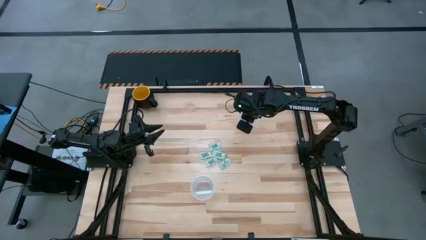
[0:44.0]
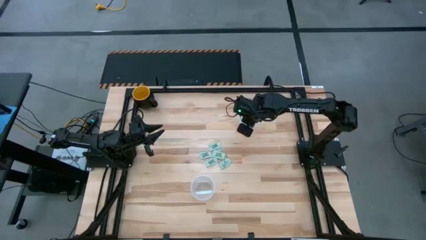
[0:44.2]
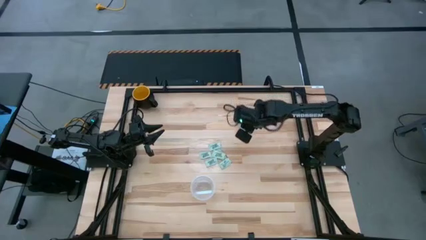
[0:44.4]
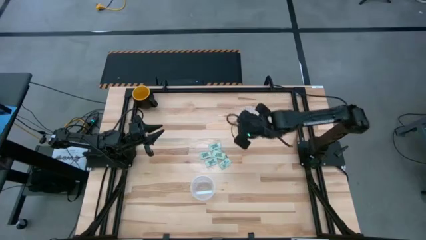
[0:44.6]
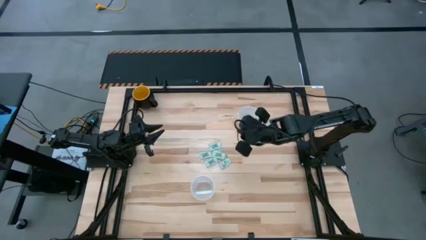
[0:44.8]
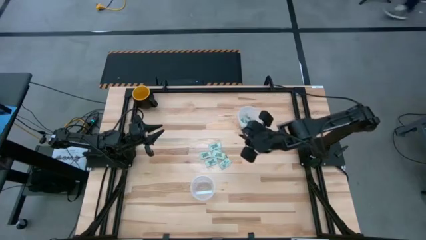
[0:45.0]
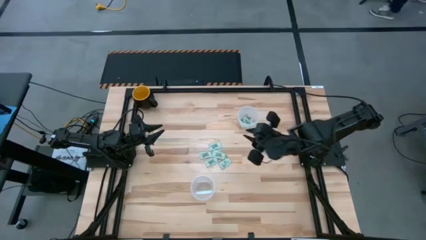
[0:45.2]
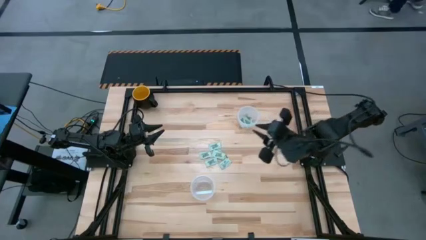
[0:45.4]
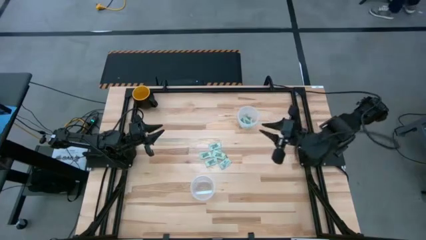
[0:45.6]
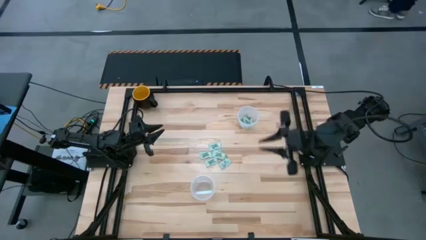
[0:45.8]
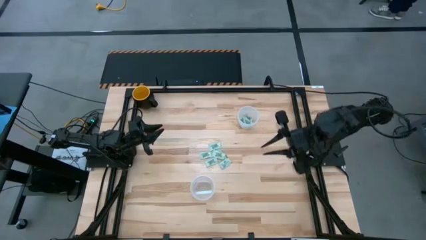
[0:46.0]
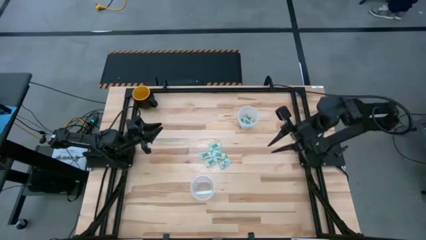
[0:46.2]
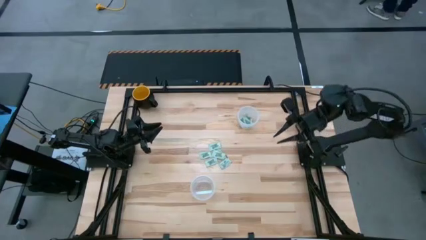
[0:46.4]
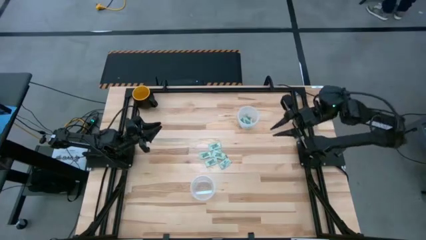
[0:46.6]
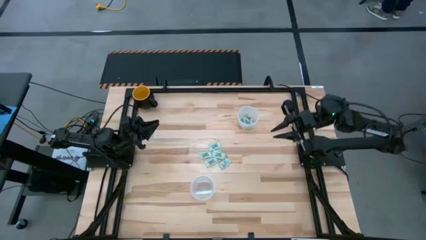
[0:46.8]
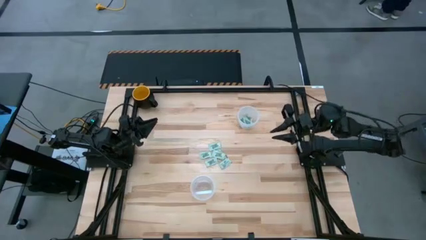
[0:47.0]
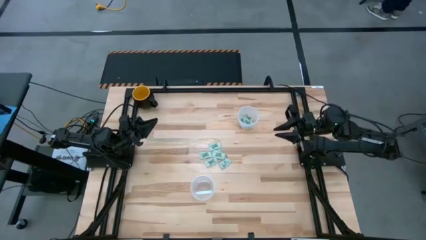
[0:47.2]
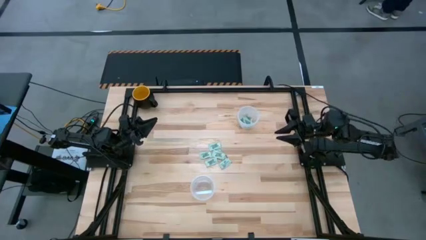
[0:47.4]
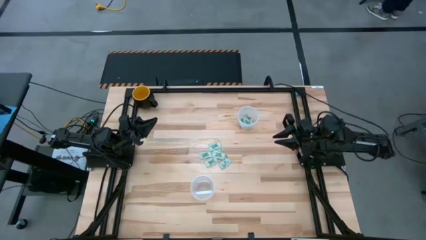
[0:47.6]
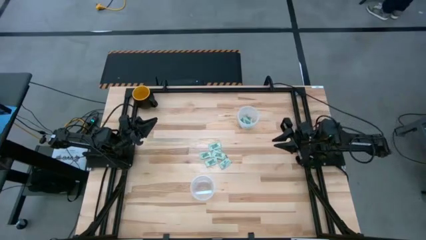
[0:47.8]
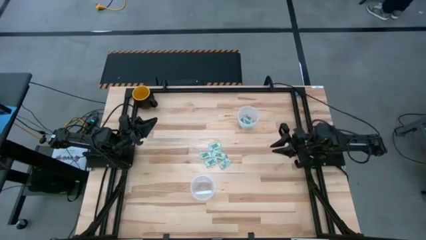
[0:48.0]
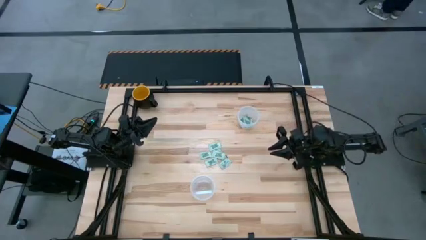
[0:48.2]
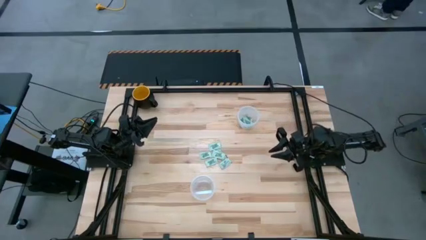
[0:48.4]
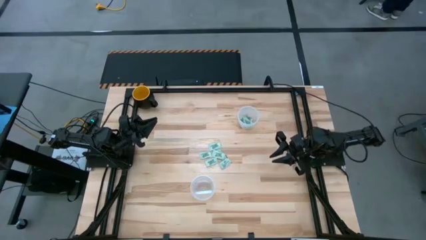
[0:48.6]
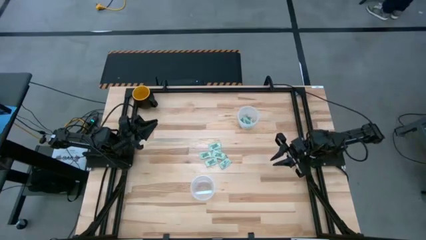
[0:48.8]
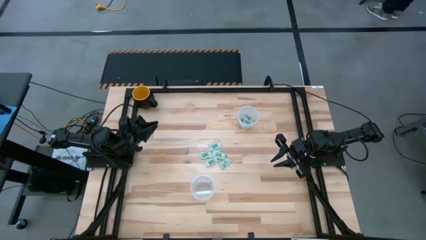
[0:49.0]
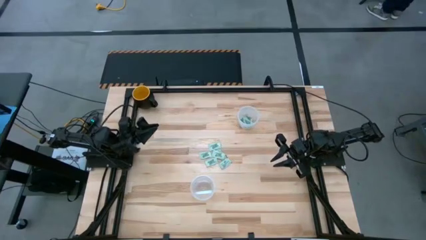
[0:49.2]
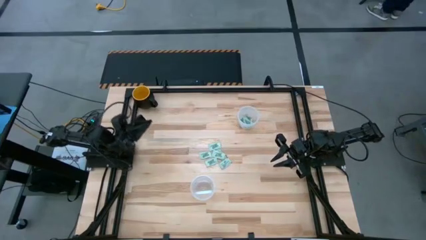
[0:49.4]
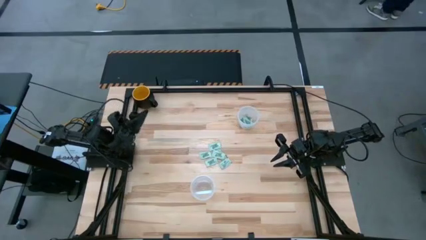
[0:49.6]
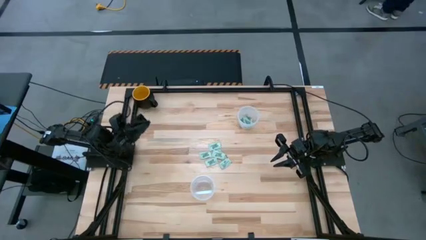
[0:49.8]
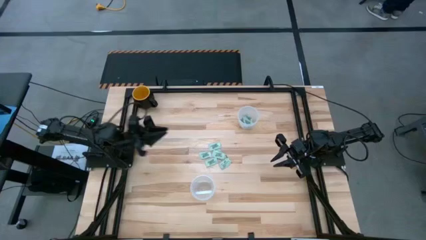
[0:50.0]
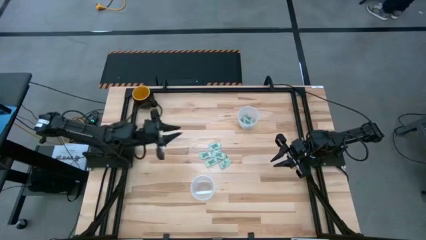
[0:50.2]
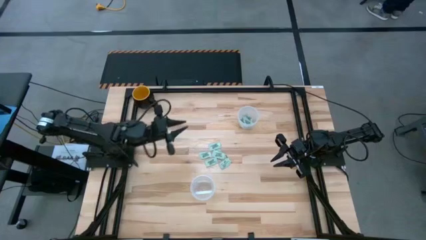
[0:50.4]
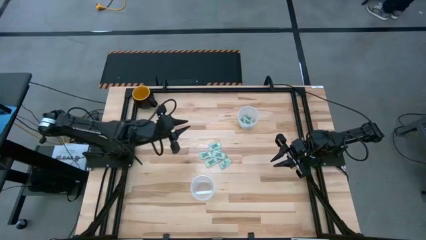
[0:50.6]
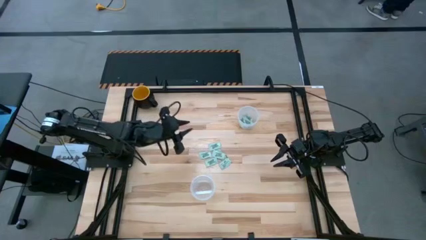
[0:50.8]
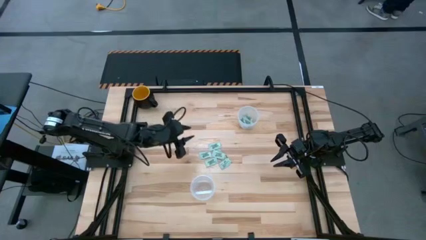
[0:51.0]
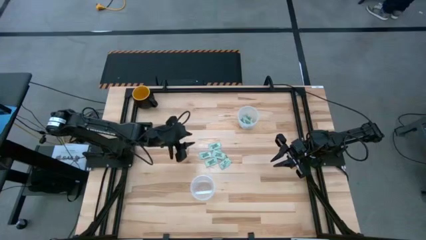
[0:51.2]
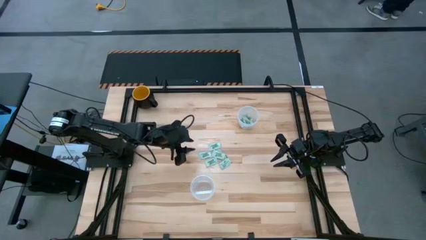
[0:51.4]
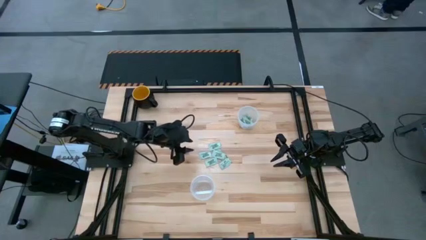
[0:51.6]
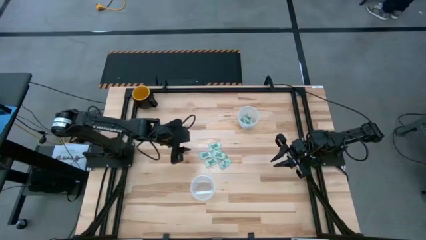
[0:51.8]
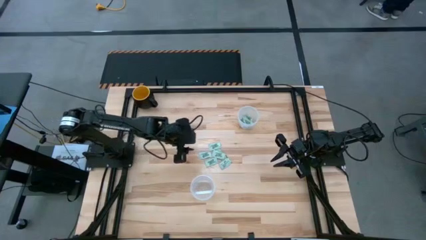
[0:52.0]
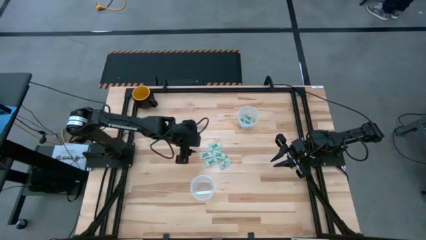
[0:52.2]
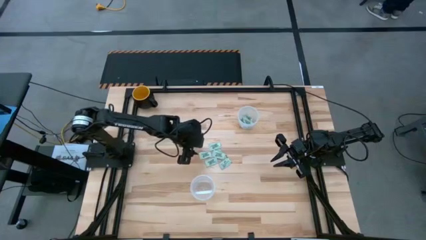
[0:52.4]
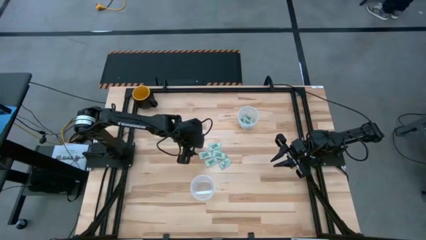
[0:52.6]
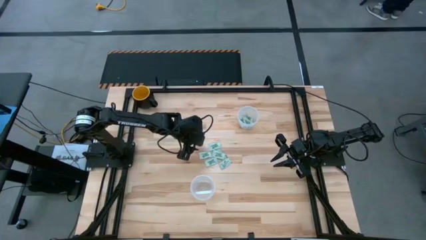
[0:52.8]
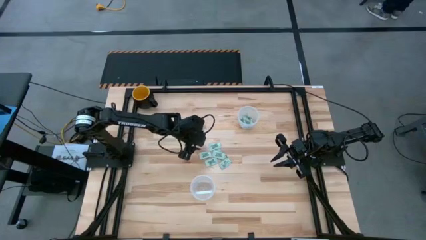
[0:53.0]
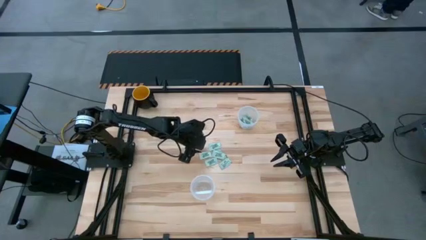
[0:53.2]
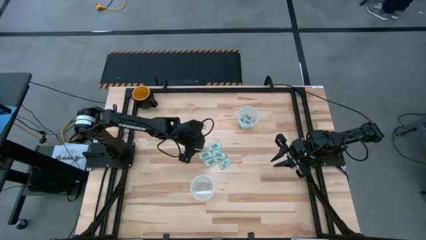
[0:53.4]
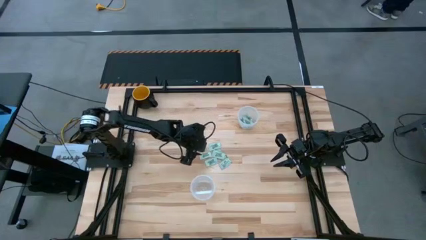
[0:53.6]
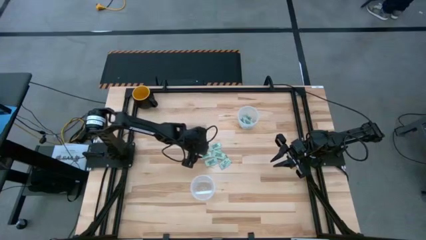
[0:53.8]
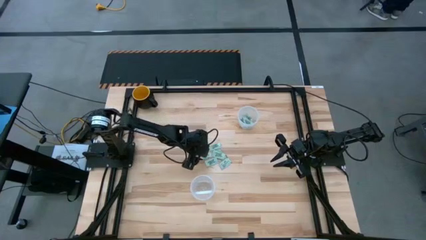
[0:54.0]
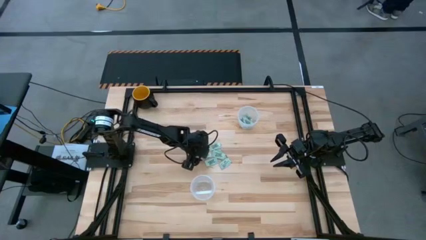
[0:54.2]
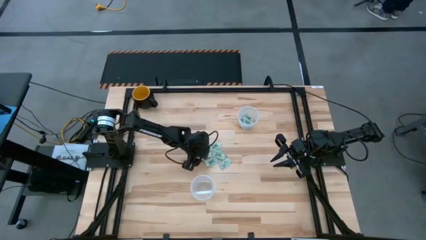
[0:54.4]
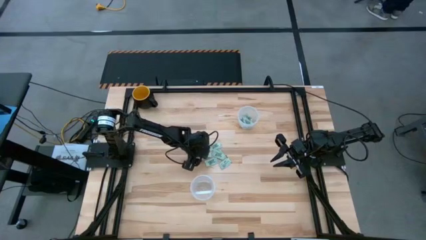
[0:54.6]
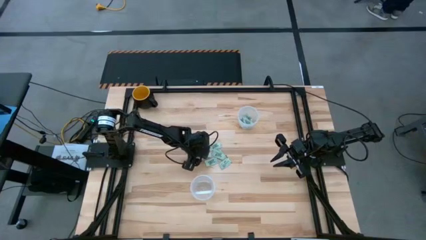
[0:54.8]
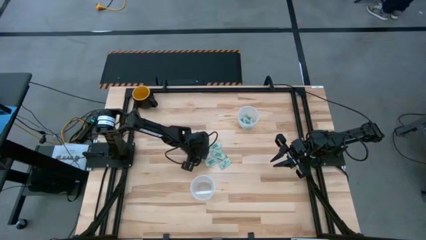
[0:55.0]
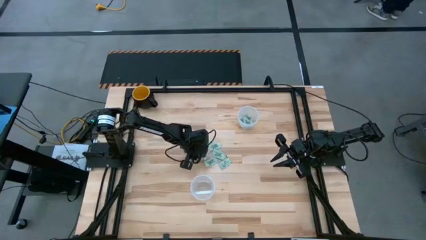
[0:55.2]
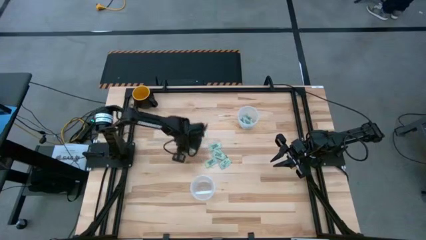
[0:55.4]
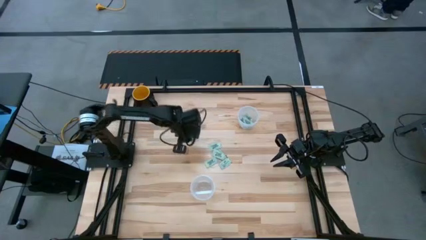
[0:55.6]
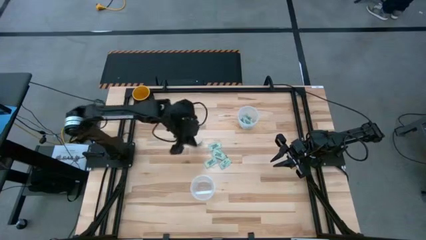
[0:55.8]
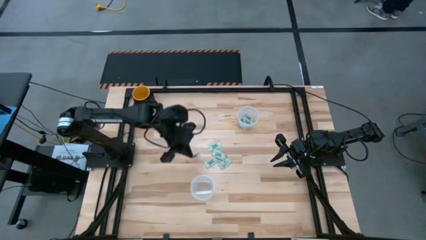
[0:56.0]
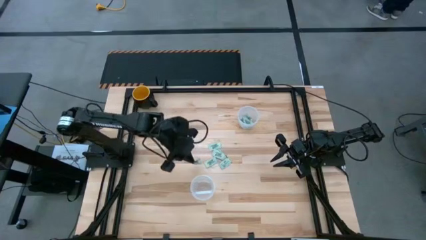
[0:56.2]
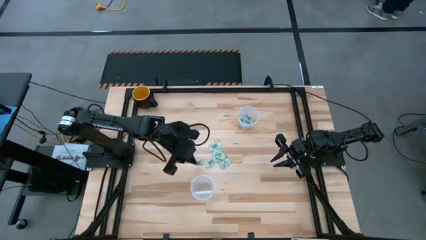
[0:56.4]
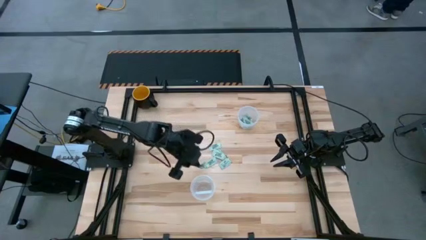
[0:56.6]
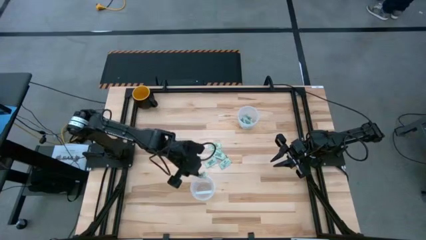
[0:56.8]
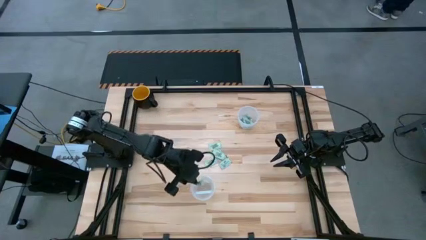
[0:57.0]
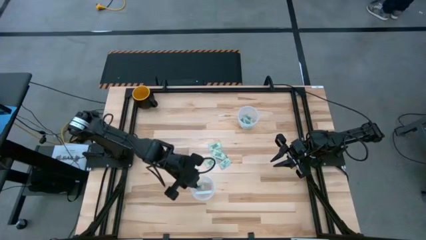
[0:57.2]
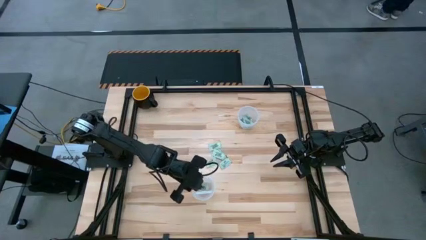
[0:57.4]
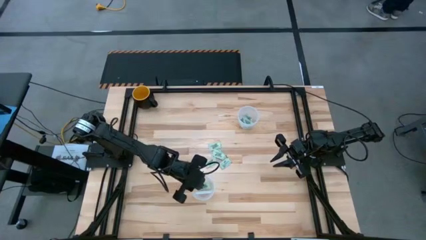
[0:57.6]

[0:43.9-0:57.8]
Task: Pick and place Stevia / Truvia into bins
Put the stevia packet into the bottom transparent container
